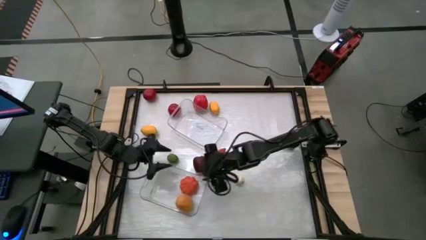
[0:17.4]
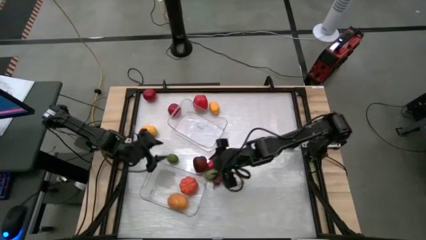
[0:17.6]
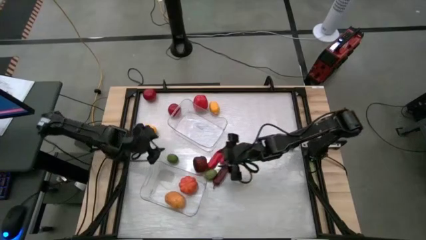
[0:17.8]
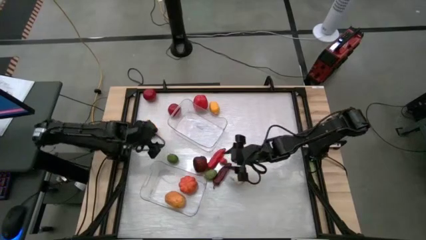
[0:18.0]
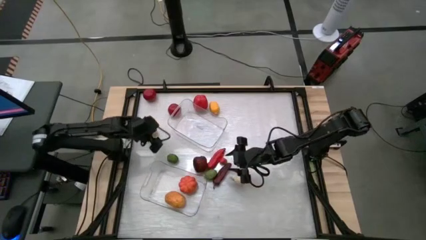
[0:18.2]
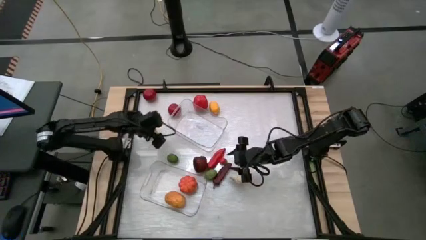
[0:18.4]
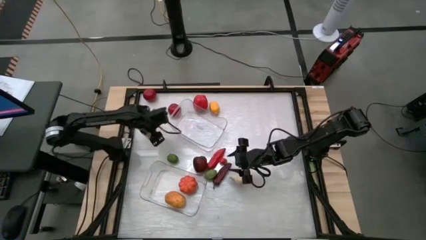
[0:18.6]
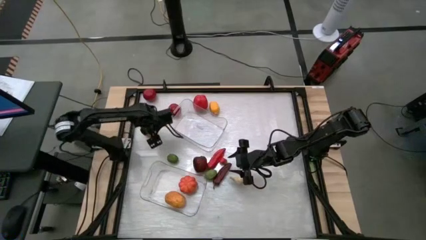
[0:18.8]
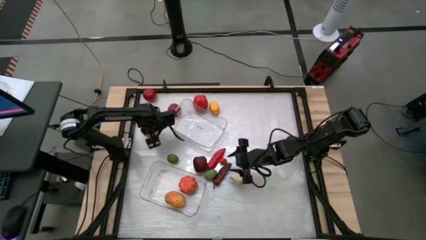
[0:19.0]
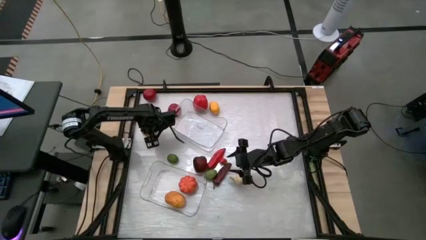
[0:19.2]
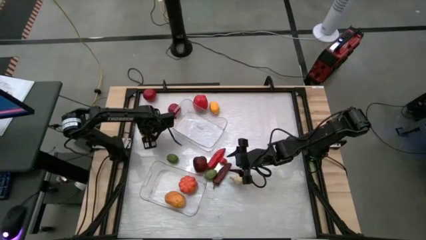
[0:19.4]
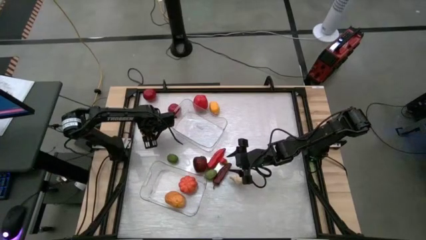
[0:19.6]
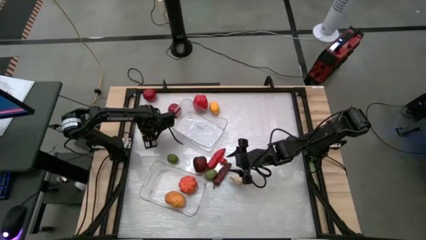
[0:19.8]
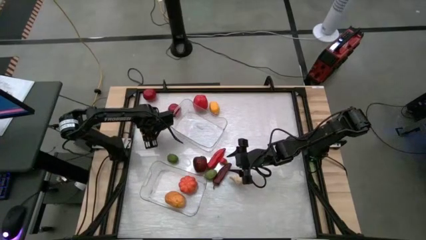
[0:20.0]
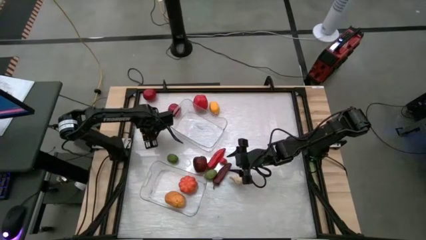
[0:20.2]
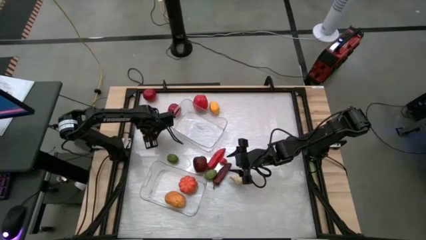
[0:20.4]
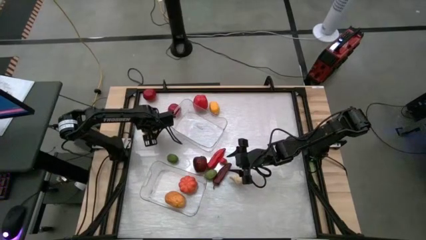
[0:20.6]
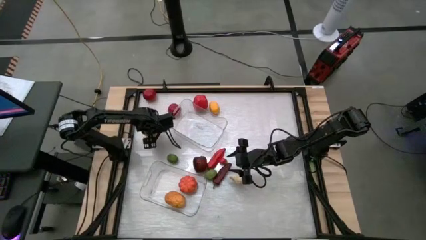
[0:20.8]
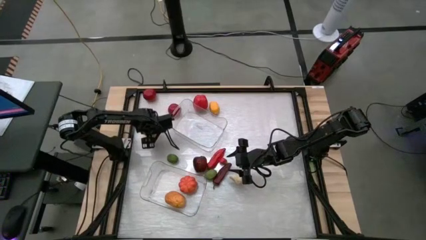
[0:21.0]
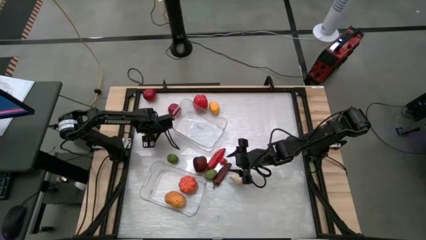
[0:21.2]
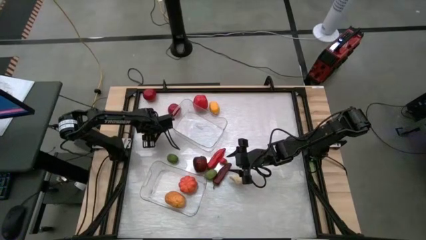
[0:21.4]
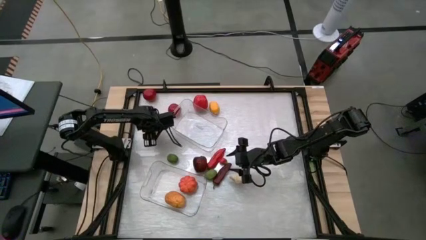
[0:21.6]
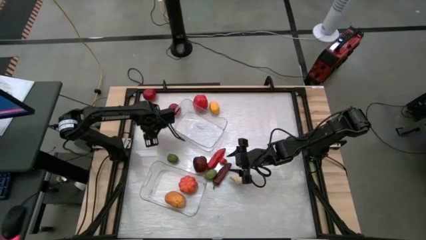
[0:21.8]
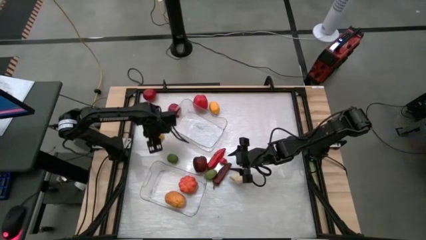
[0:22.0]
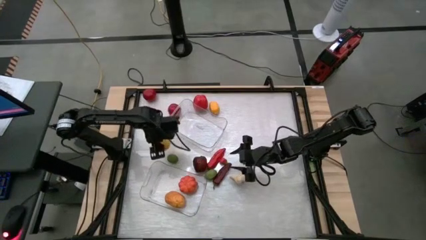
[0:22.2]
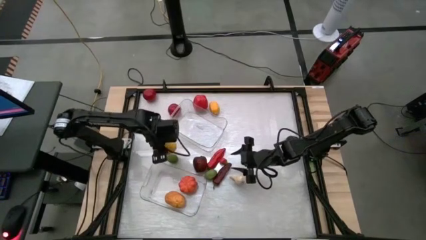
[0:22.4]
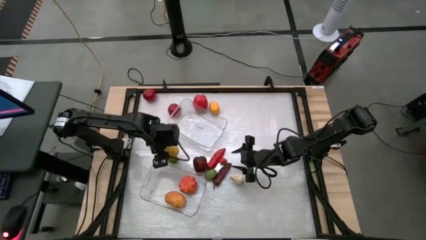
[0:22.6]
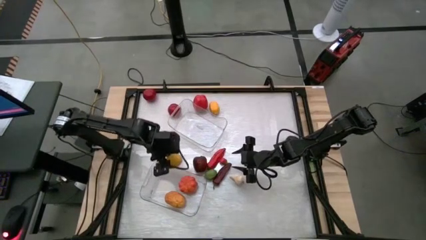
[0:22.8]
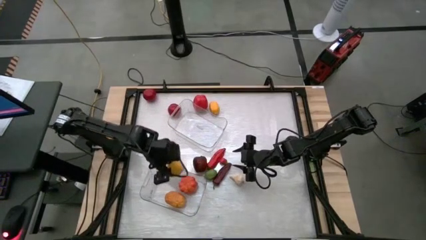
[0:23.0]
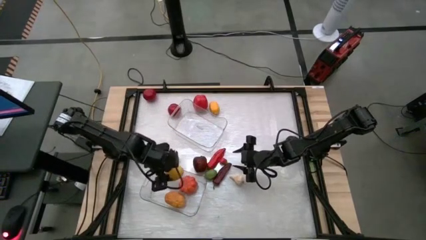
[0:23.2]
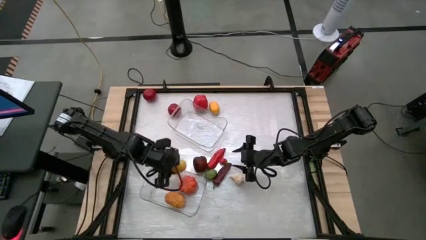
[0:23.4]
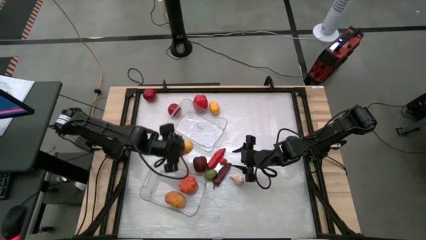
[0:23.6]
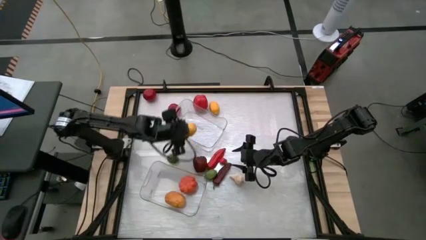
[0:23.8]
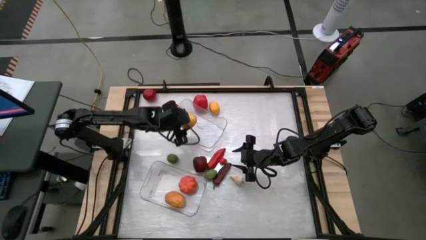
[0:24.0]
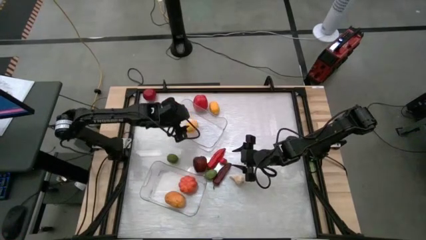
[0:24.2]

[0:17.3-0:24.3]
Task: Sort produce into baskets
Put the left lemon into the top transparent bin

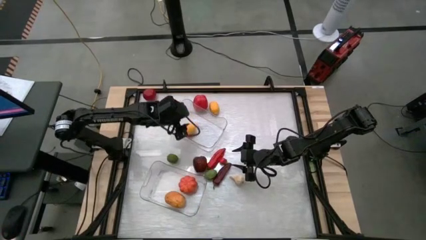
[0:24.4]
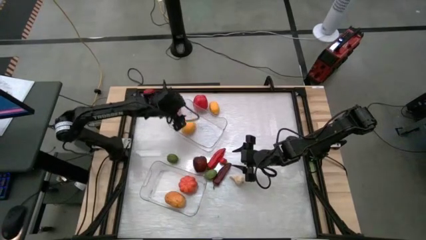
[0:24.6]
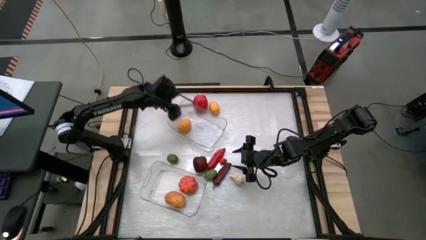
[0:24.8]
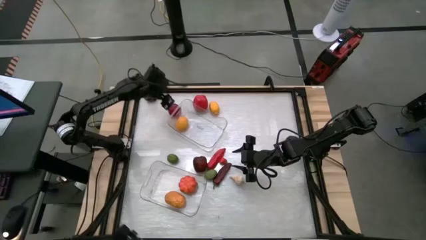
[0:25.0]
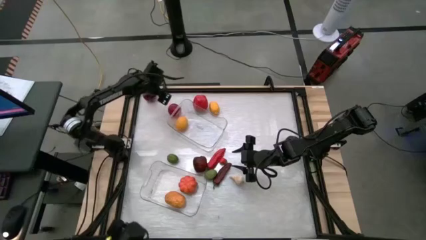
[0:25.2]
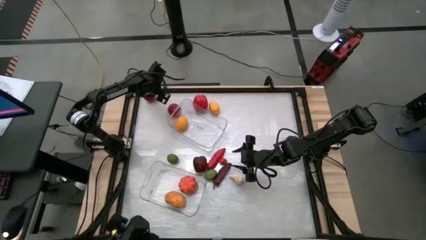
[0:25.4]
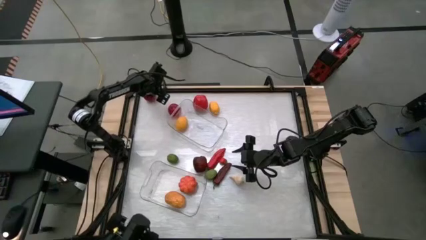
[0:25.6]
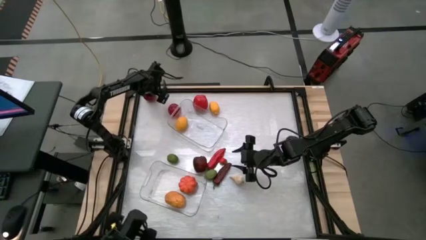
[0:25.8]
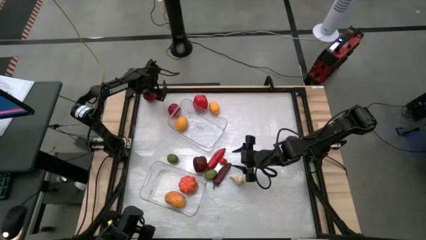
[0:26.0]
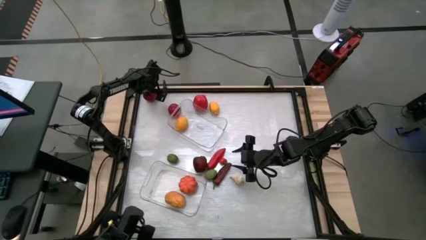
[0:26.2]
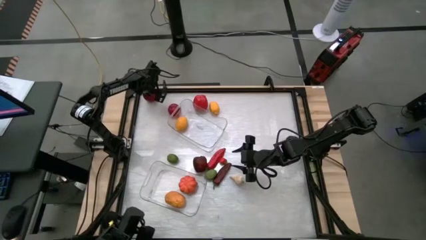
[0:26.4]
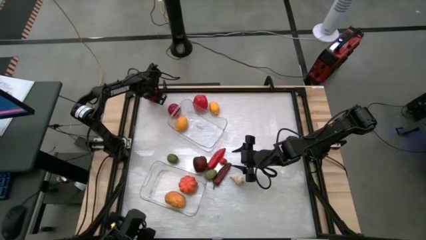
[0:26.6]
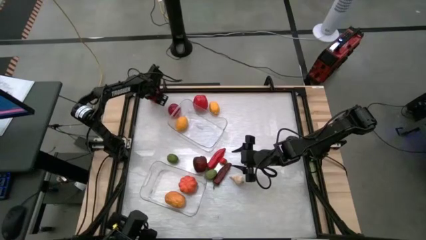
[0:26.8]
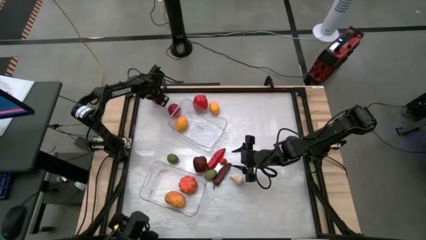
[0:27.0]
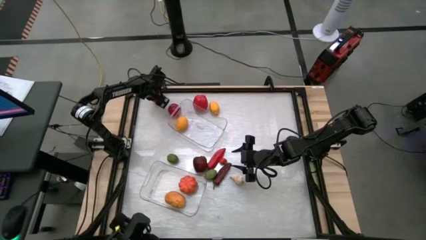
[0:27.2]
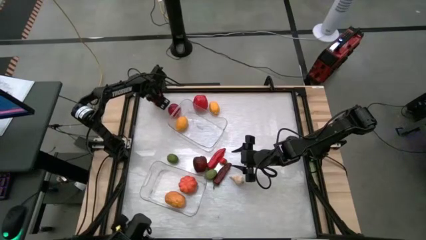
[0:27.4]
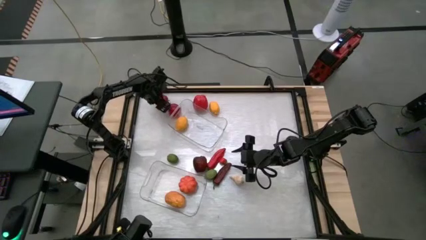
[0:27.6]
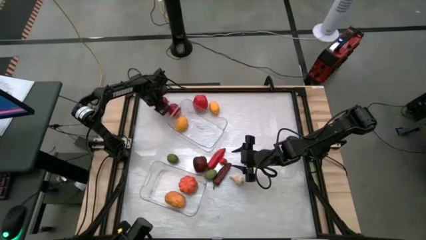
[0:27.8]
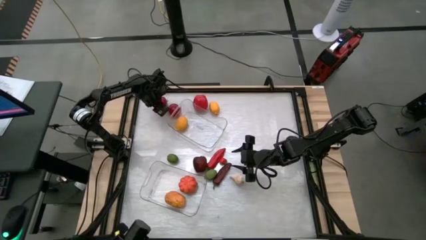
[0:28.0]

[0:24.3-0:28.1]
Put the left red tomato into the top transparent bin

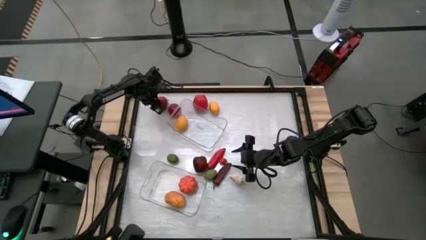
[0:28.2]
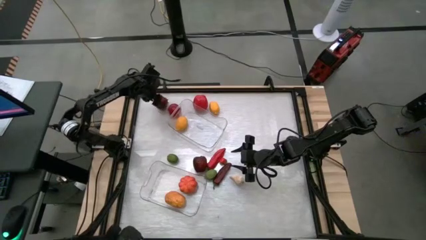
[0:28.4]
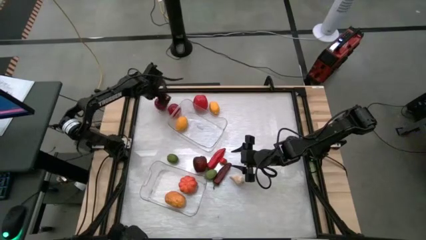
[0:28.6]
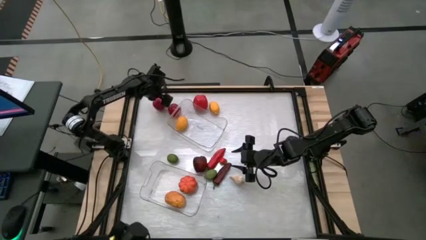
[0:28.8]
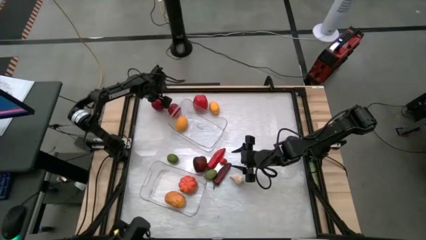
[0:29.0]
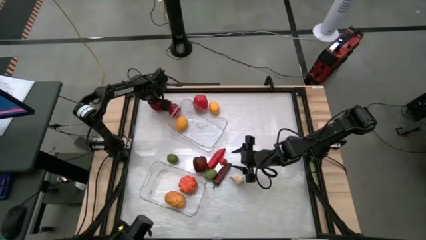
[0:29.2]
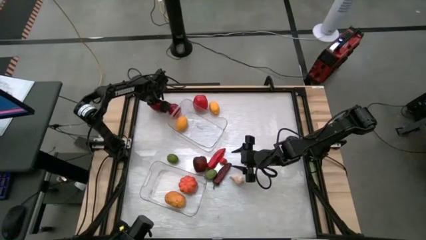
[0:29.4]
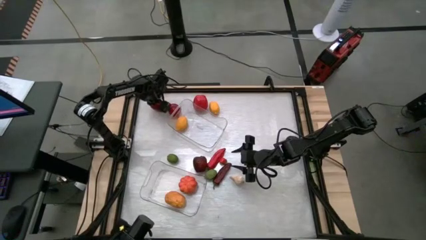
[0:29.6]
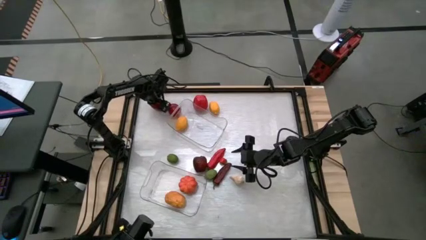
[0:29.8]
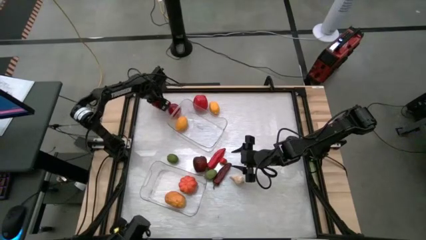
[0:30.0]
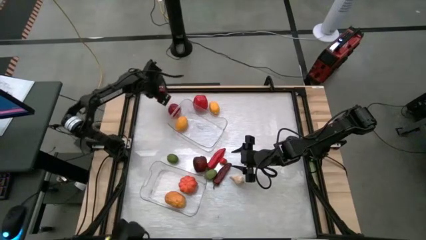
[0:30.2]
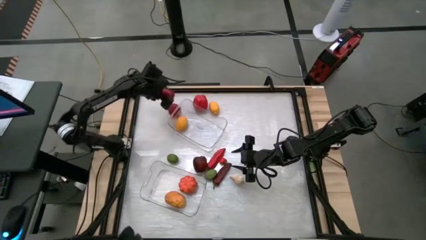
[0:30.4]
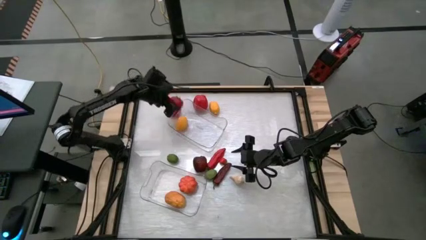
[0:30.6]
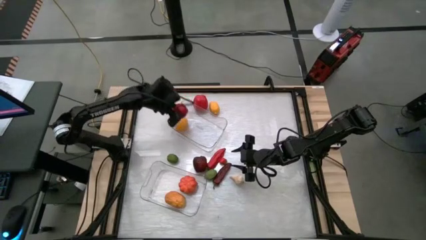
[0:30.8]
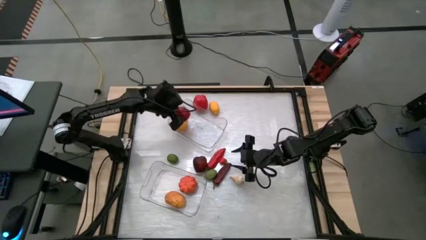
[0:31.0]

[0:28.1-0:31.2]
Put the left red tomato into the top transparent bin

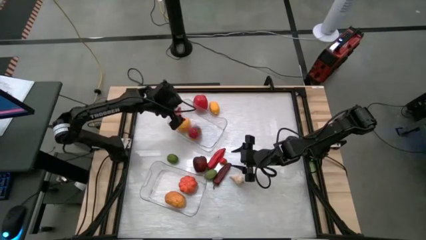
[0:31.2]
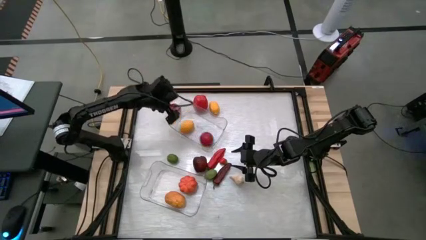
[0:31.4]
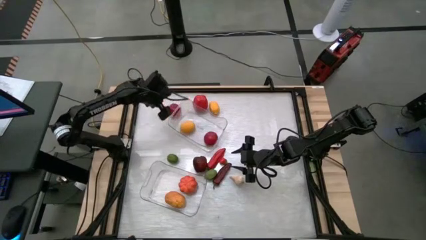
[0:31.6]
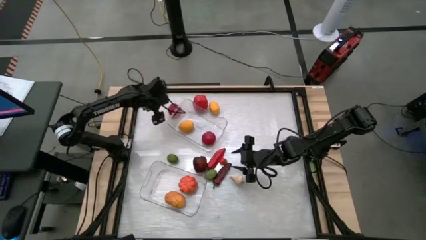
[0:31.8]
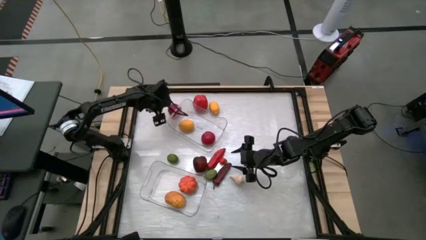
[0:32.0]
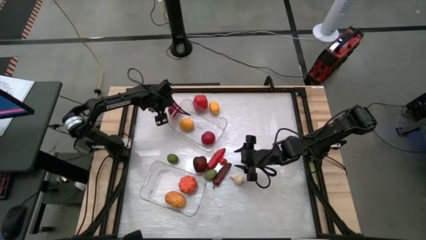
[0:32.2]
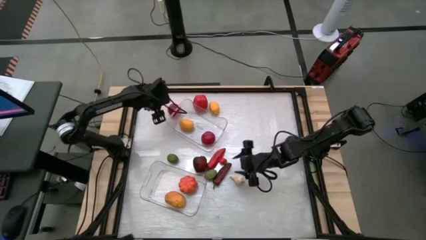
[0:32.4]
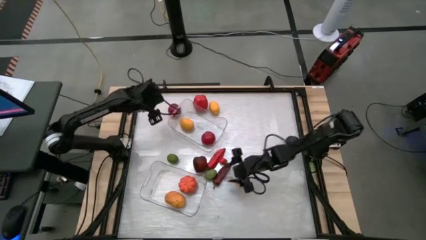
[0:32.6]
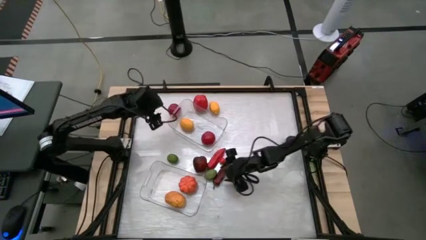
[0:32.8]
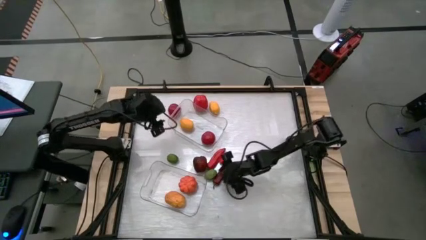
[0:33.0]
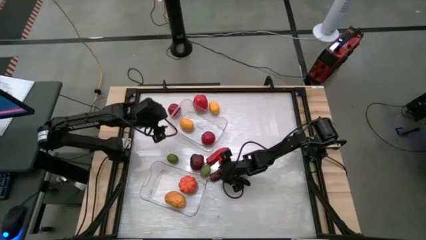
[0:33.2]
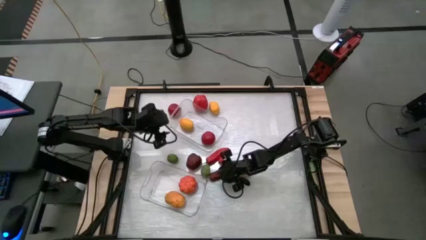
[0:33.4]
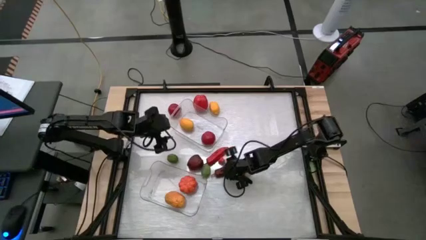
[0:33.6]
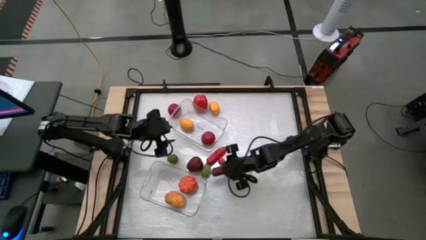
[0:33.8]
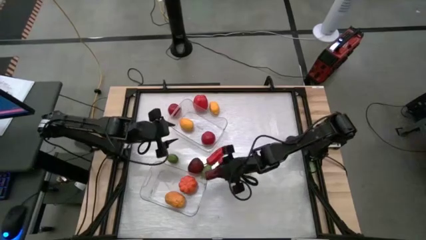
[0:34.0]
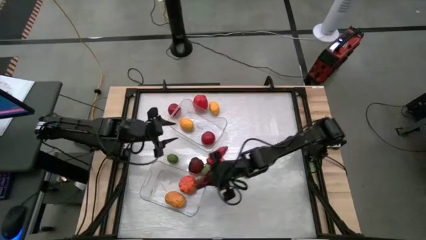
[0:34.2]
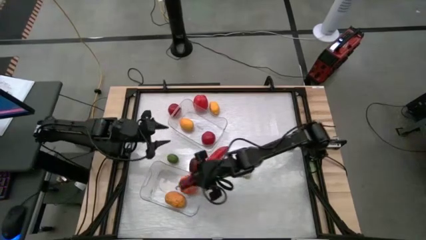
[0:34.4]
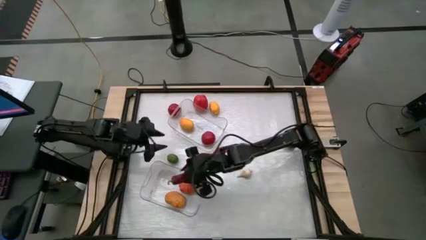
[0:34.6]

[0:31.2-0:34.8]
Put the bottom pepper into the bottom transparent bin
